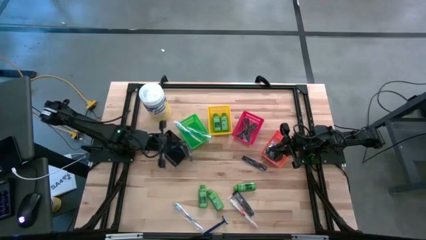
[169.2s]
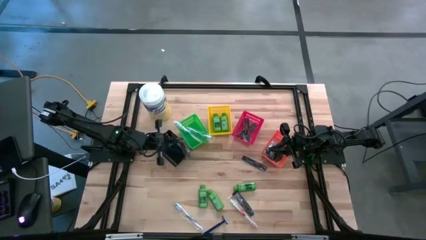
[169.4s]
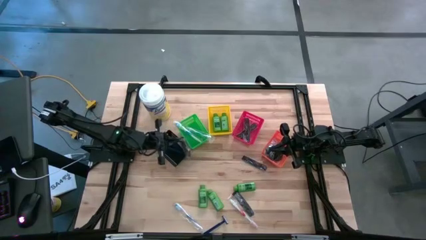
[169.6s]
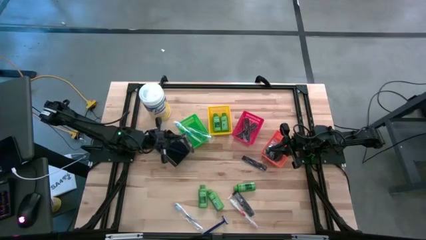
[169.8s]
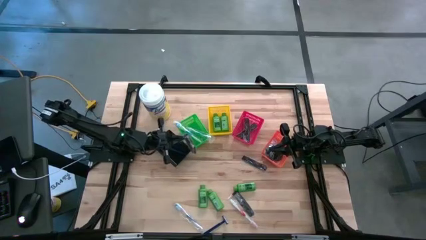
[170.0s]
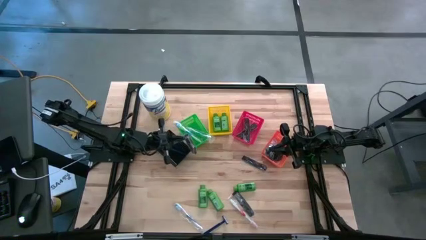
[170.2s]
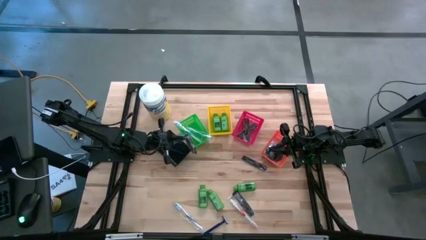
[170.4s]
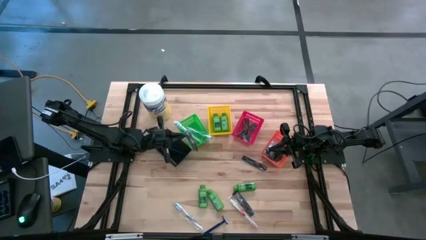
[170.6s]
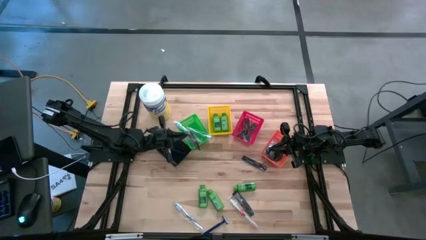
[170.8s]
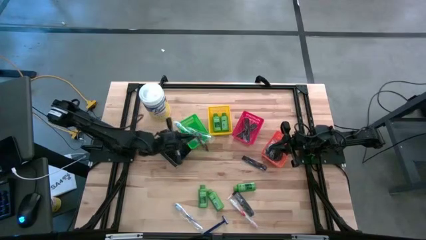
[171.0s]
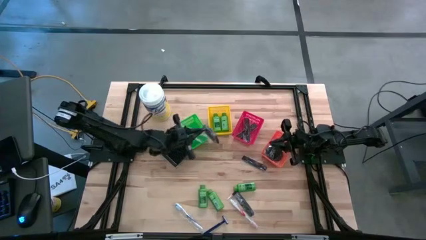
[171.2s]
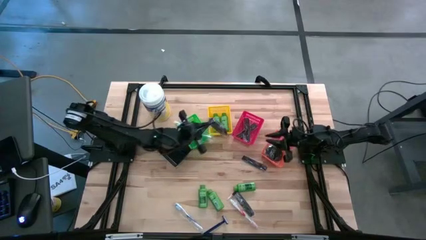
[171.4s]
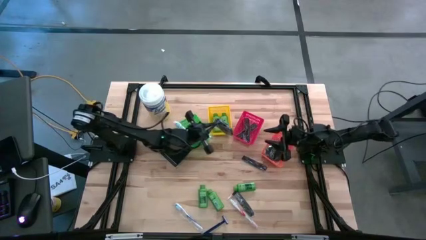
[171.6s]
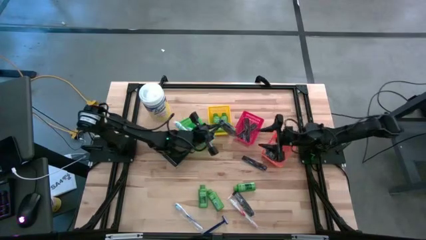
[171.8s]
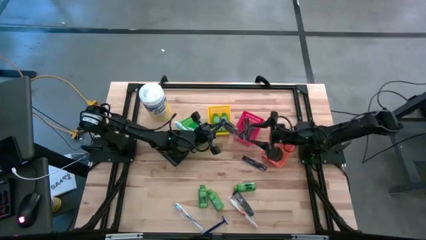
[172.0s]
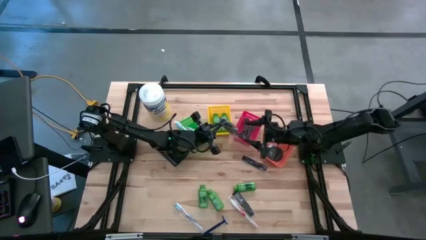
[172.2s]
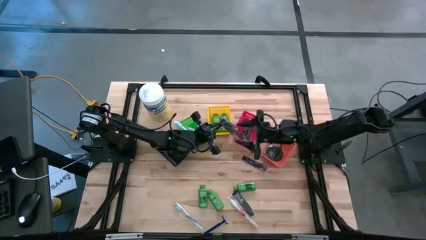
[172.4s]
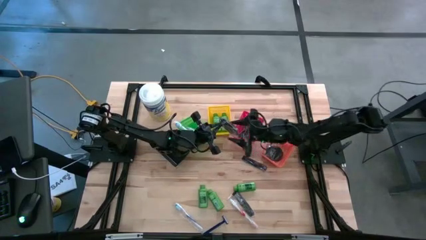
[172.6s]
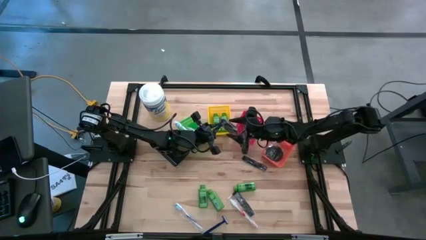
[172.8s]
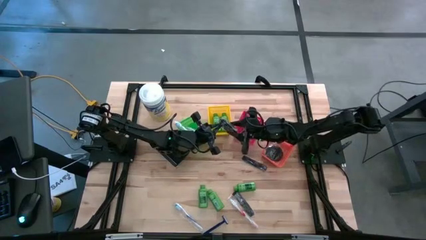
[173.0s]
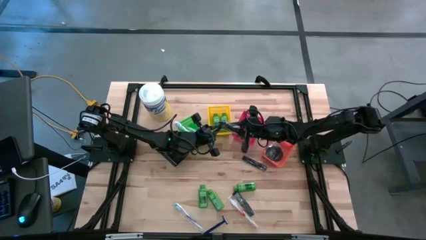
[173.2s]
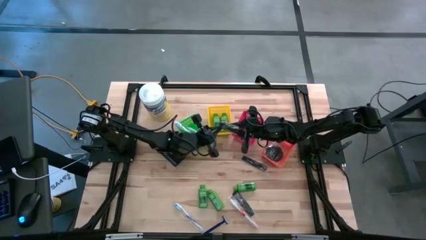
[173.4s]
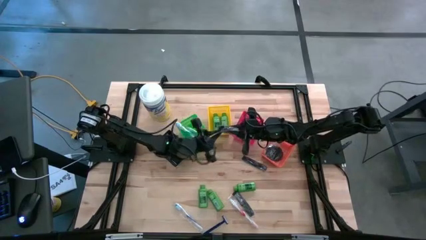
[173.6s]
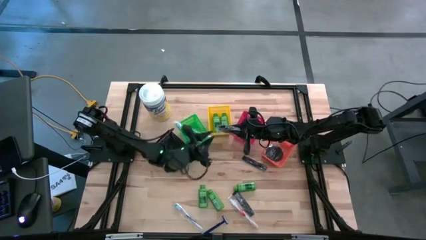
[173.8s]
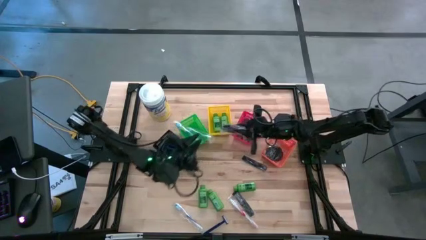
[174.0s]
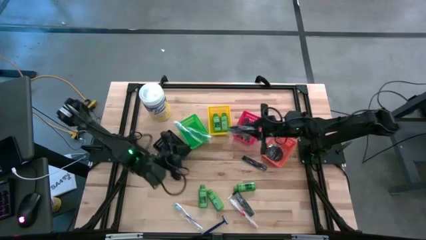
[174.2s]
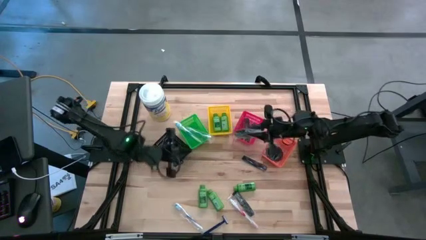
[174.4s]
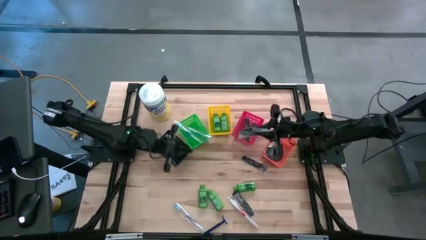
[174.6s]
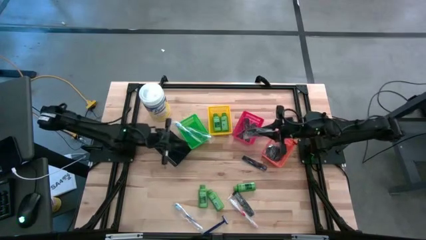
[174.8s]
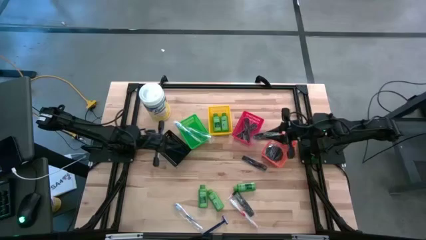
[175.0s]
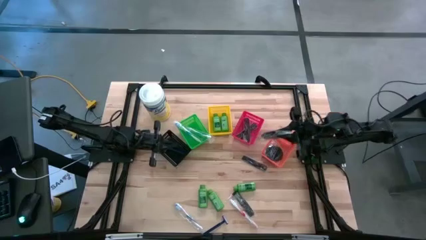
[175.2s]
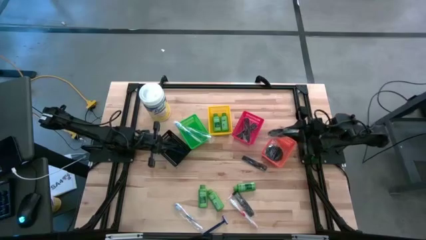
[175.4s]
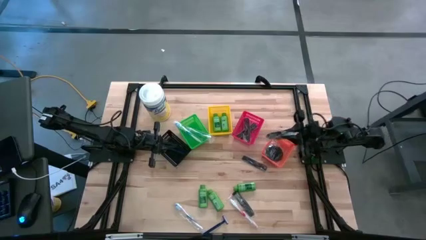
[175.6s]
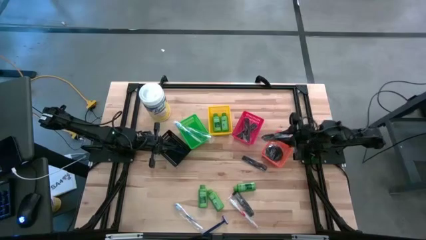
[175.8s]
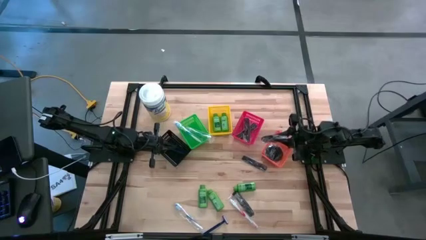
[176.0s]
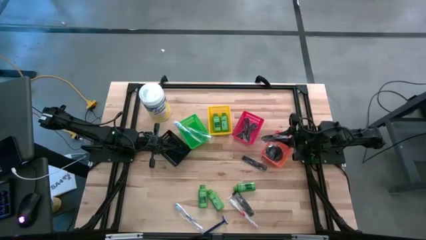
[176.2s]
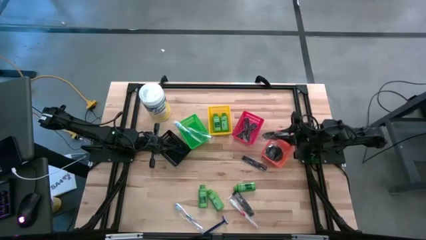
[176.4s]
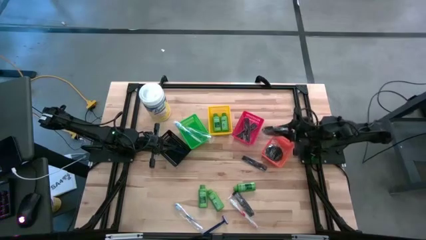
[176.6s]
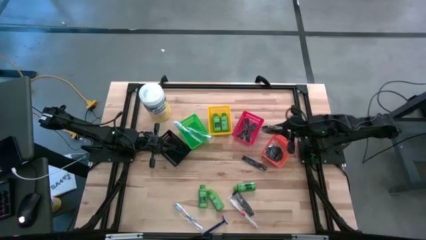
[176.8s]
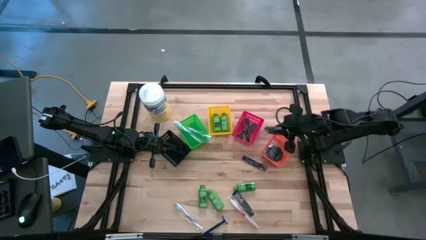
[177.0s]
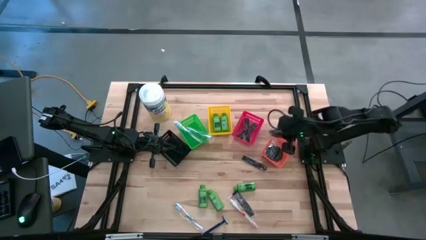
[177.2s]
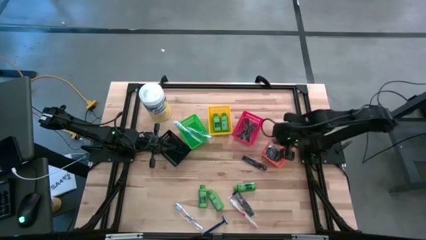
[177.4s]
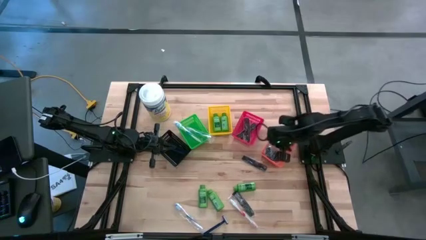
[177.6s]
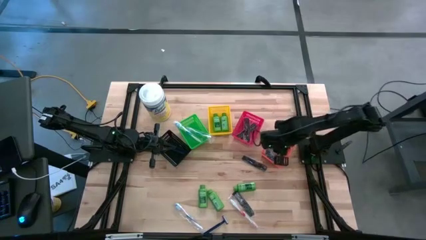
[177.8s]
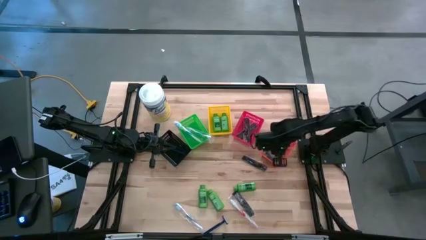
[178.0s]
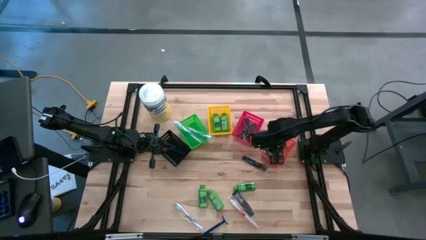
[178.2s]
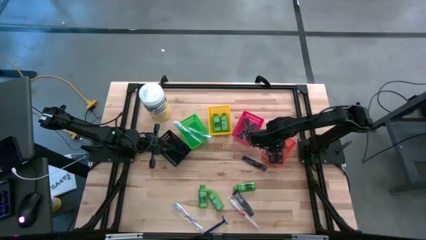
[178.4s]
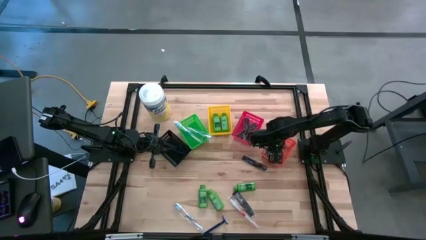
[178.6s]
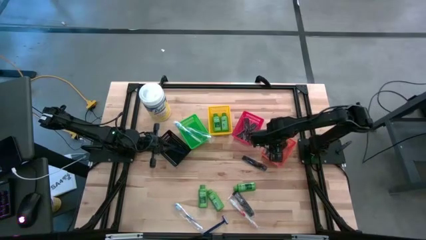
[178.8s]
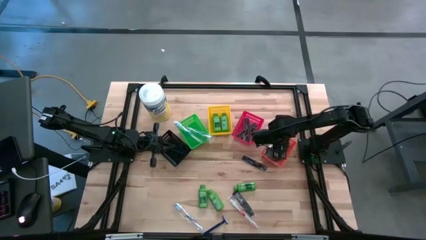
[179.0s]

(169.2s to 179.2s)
Task: Pick & Place Travel size toiletries
Put the black hairbrush into the orange bin

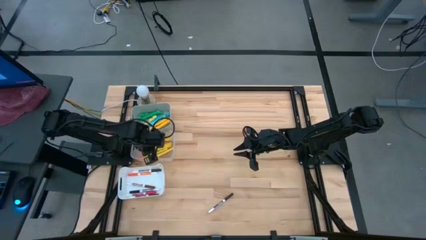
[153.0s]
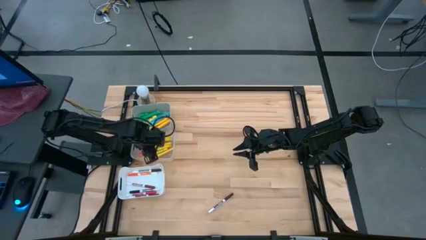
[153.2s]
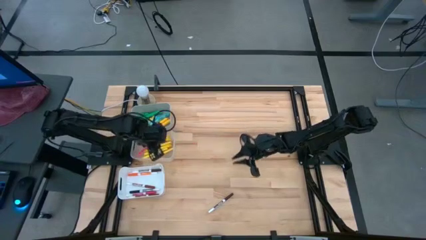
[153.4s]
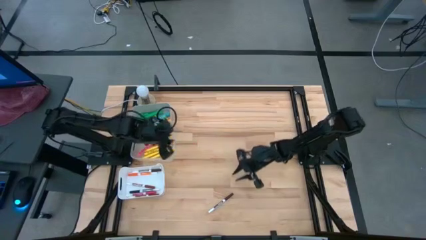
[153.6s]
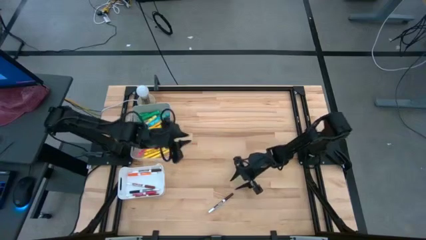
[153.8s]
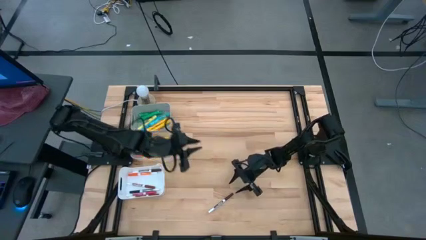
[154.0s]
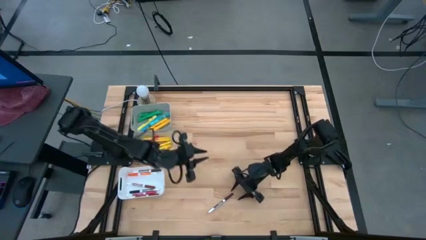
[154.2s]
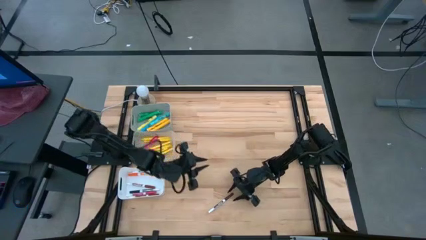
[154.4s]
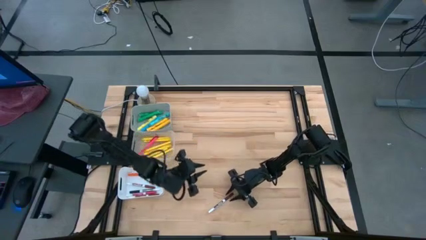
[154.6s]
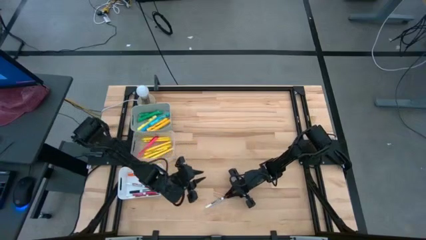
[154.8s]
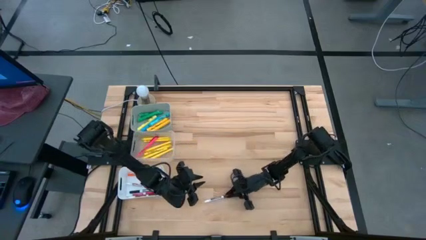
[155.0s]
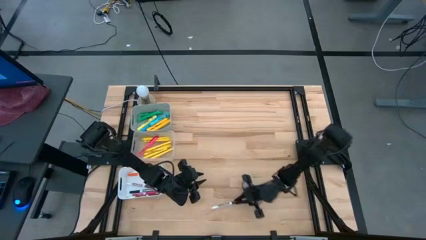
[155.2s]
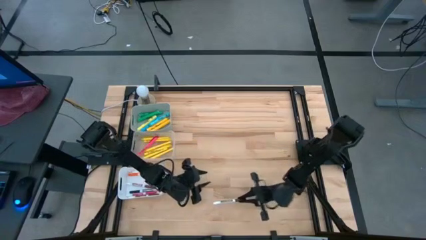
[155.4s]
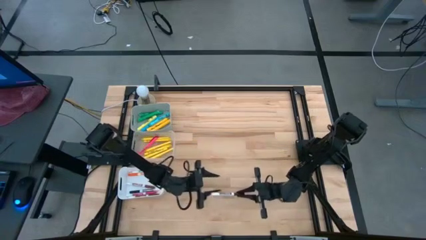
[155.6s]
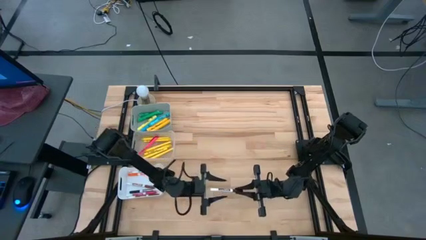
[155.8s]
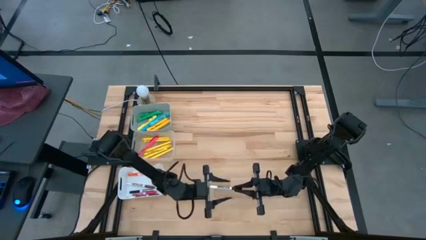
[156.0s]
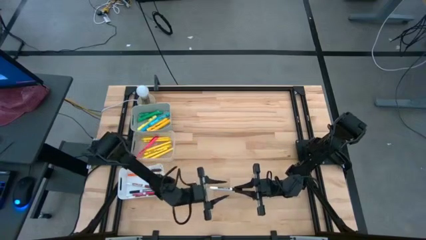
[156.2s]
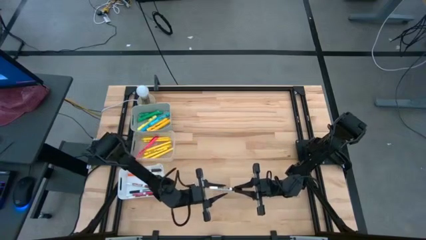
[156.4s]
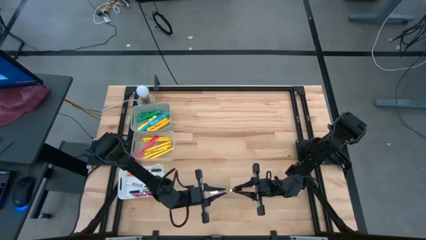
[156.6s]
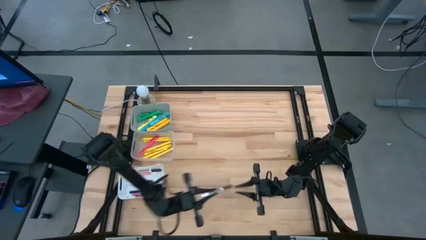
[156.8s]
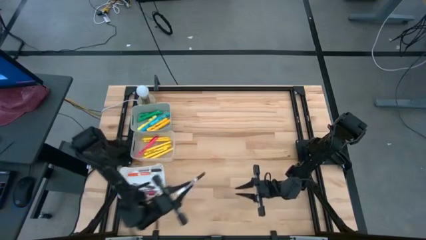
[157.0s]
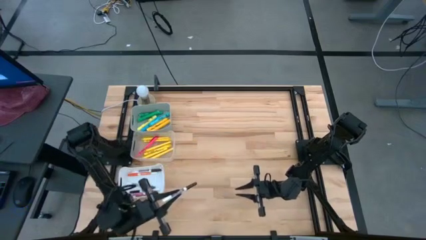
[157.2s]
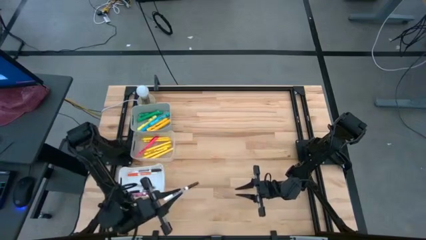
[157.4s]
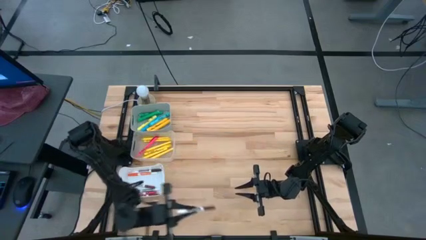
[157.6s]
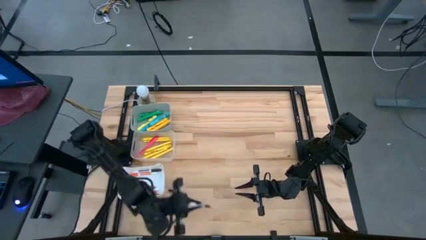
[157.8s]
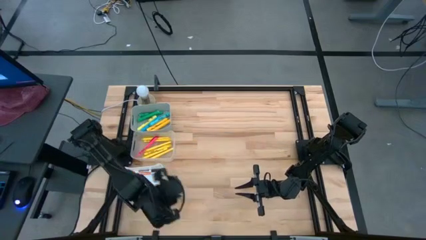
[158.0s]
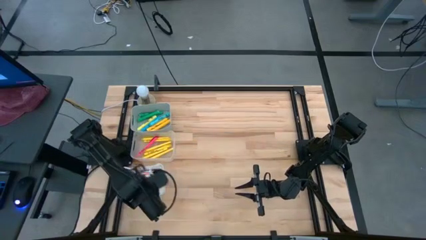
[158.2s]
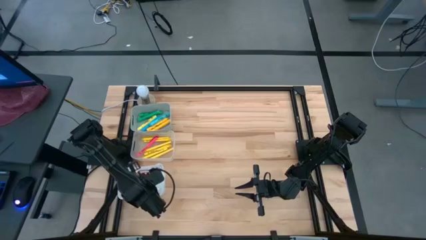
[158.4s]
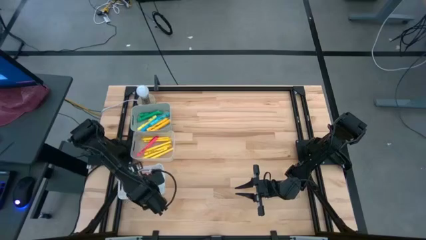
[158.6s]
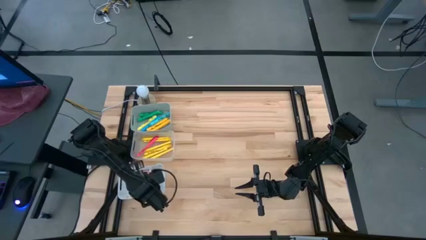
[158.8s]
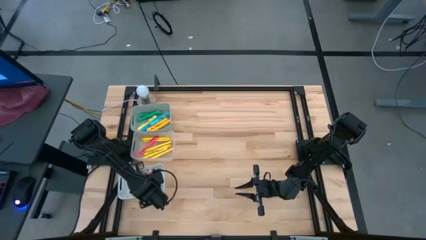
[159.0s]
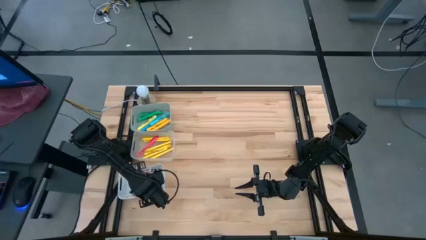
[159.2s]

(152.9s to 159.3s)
Task: Pick & Place Markers
Put the brown marker into the white bin
